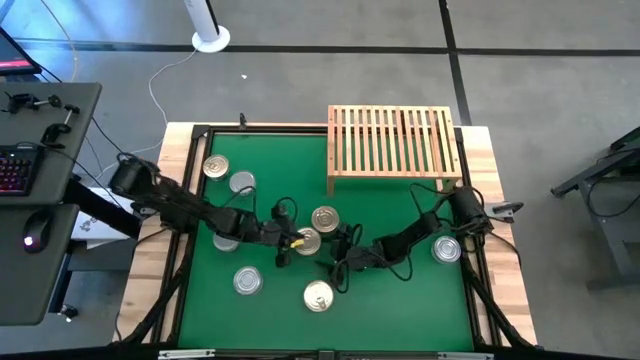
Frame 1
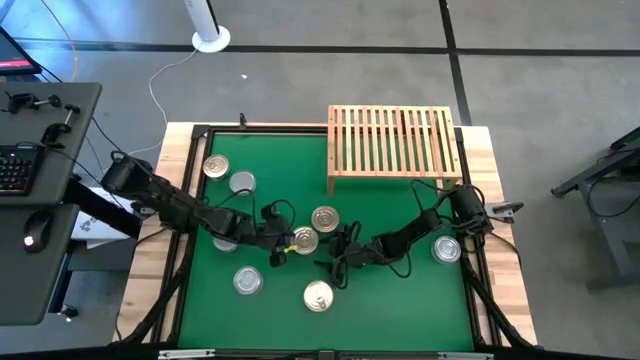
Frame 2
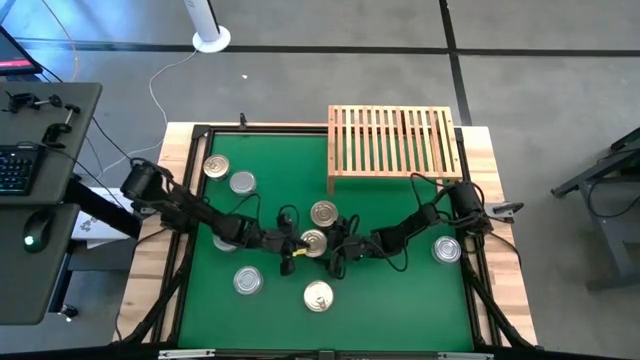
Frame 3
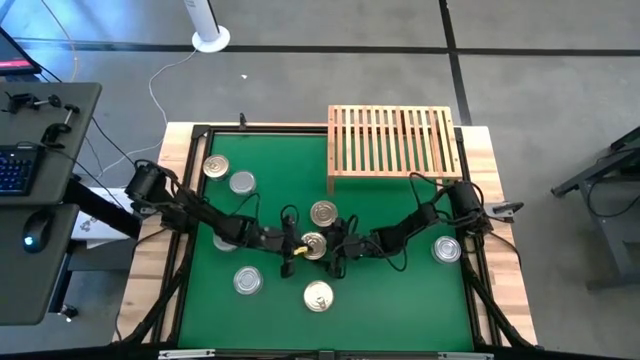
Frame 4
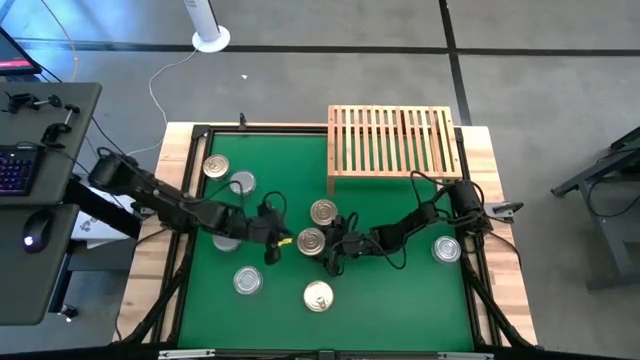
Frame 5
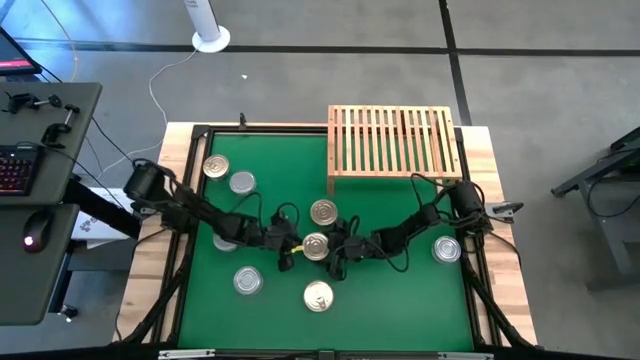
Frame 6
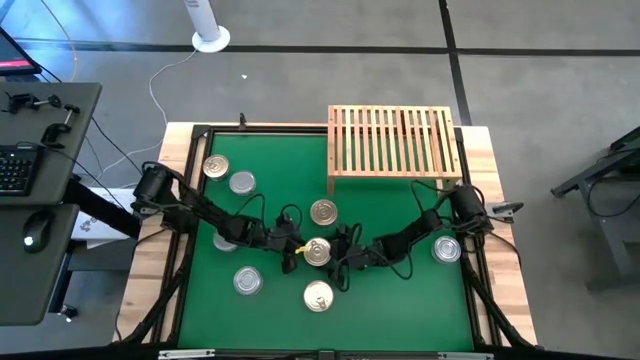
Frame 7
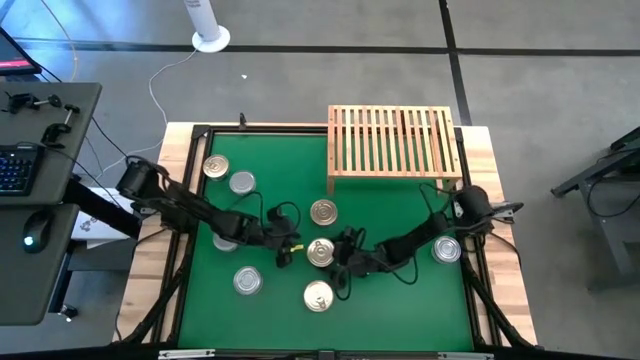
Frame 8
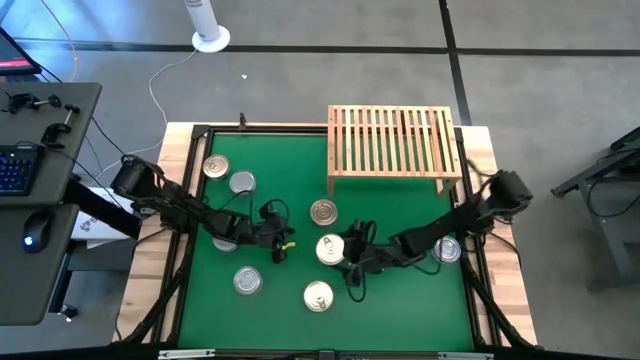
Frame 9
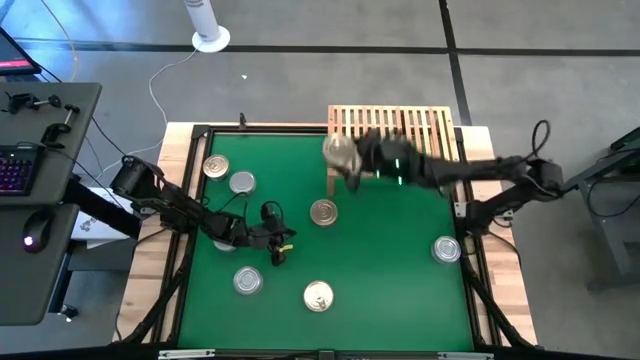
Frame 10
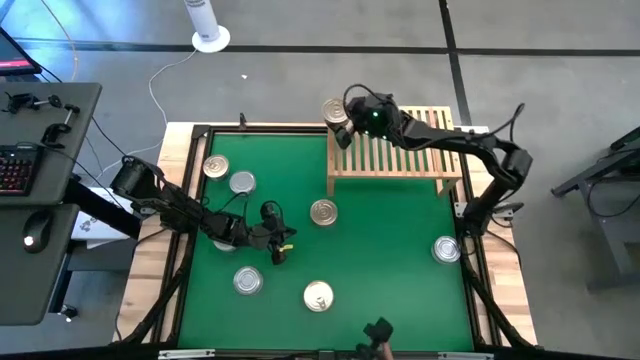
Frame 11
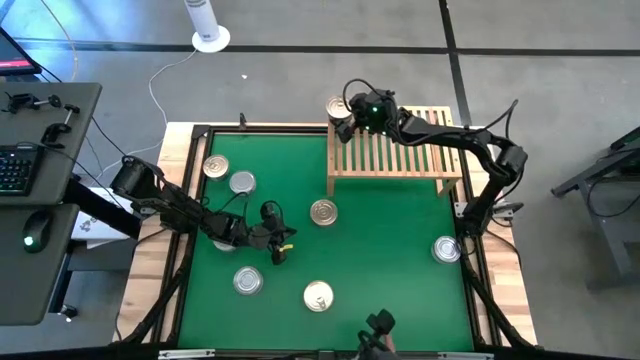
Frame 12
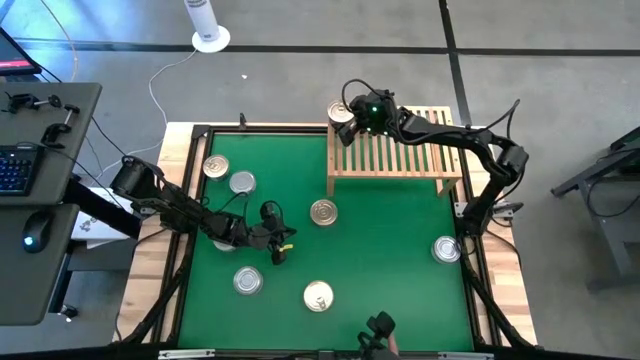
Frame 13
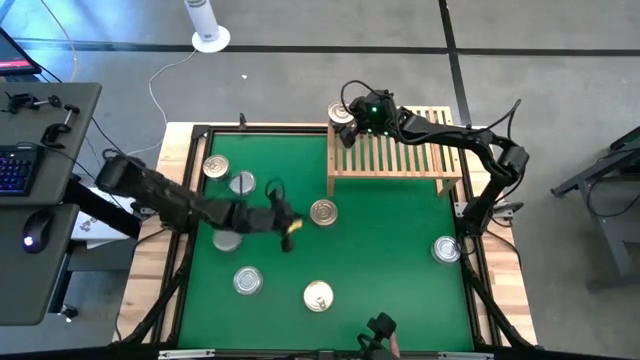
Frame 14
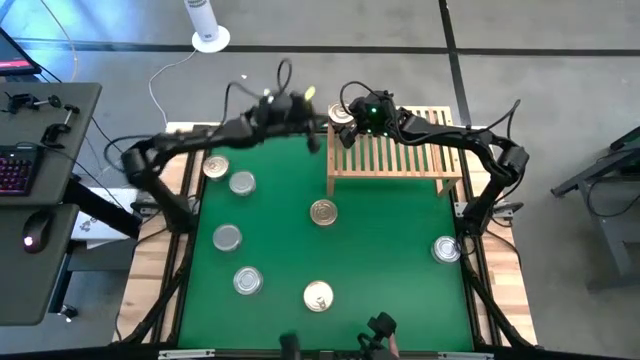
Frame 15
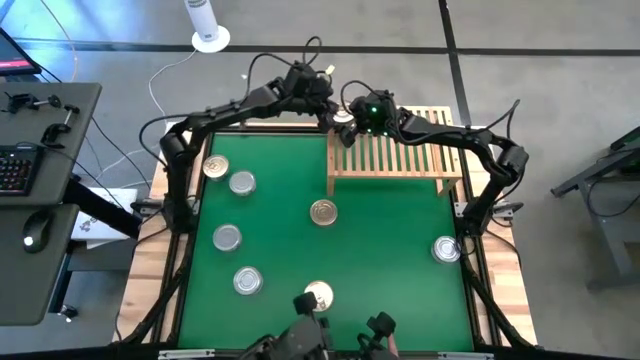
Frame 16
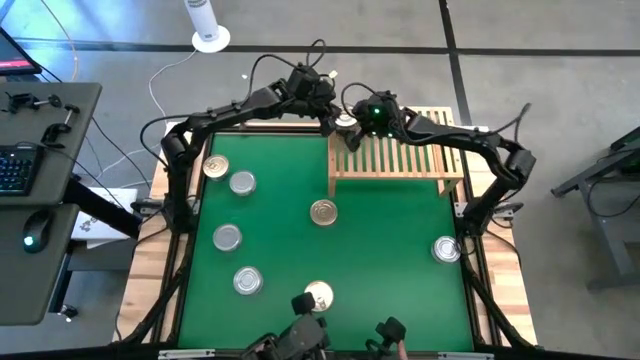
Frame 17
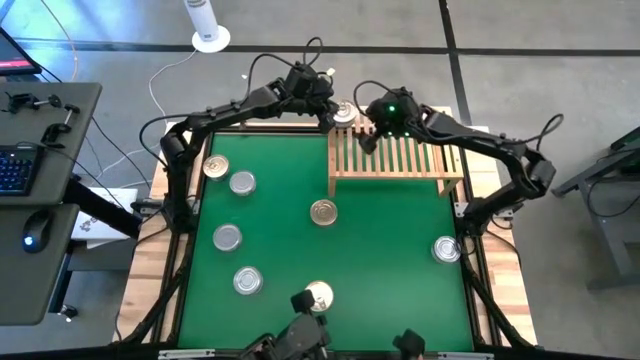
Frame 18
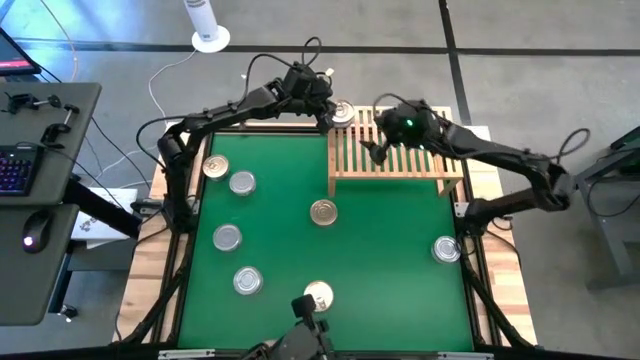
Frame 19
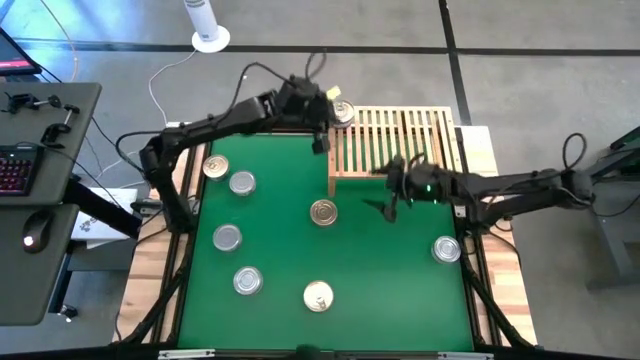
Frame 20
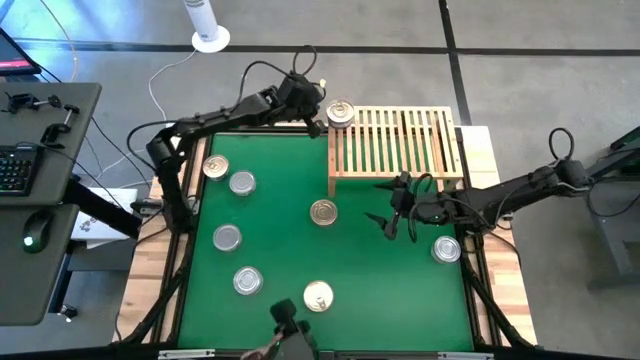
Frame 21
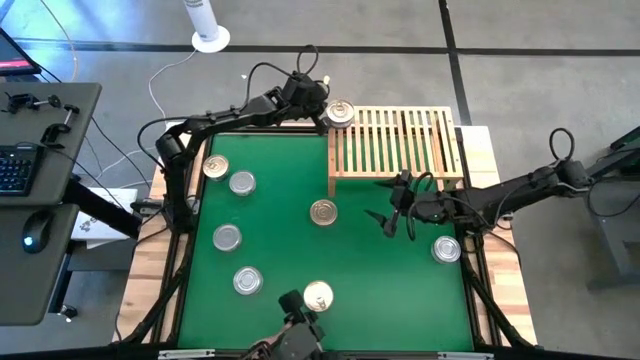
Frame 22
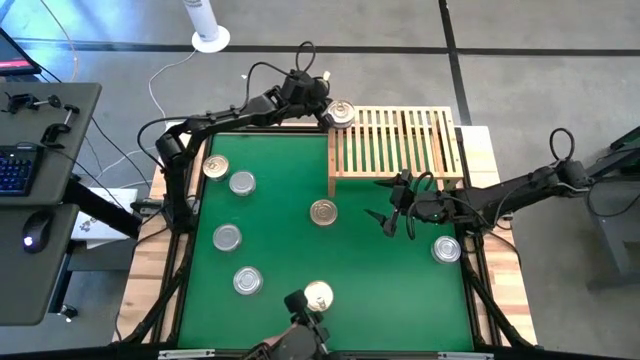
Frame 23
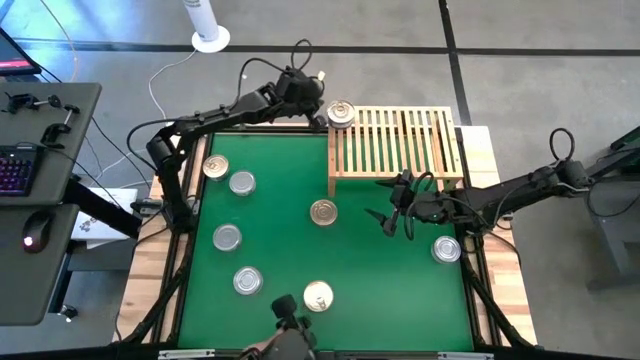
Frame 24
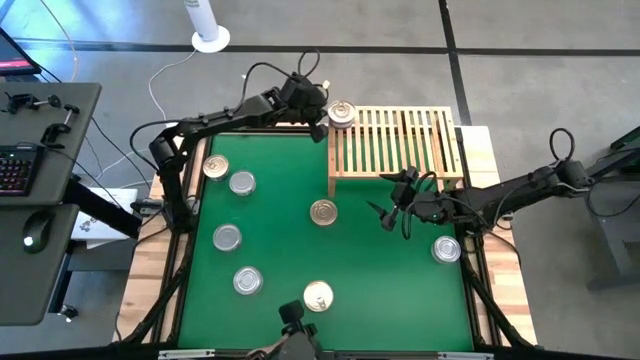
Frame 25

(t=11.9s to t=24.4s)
Task: Stack canned seafood by type on shelf
Put the blue pink tuna can on the shelf

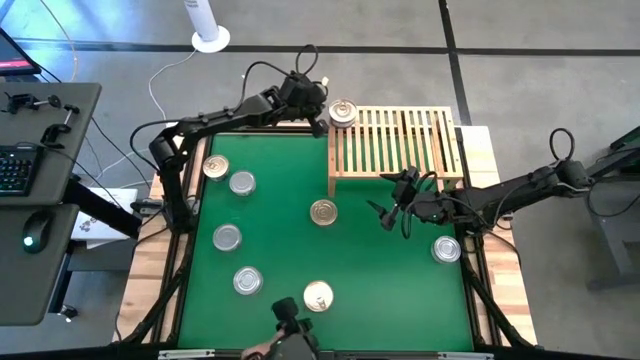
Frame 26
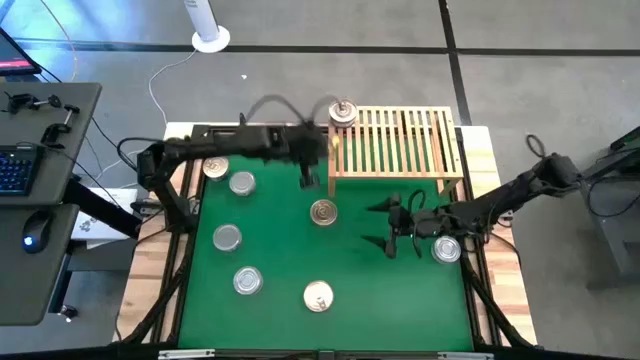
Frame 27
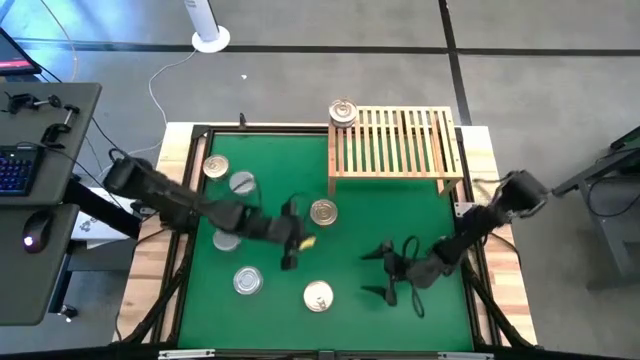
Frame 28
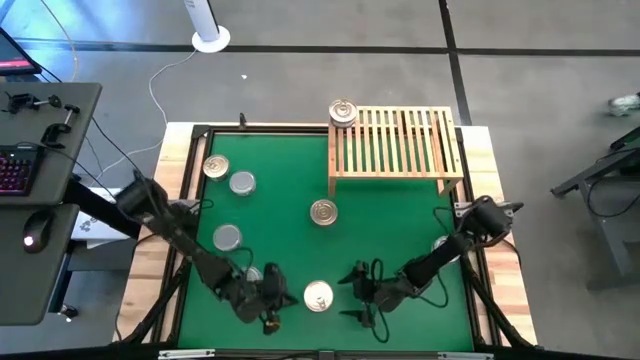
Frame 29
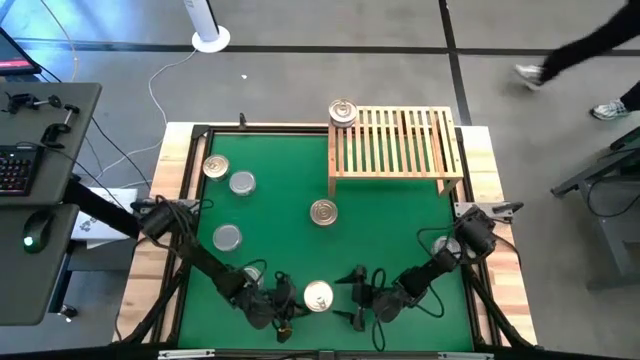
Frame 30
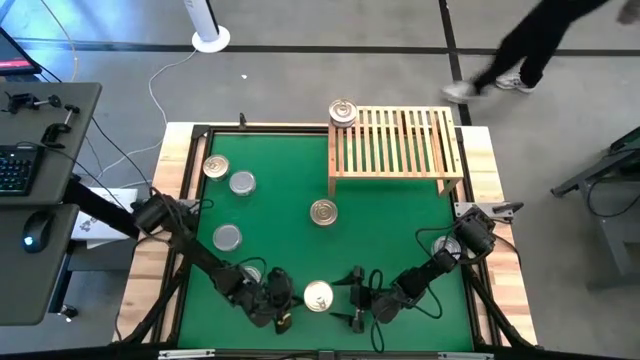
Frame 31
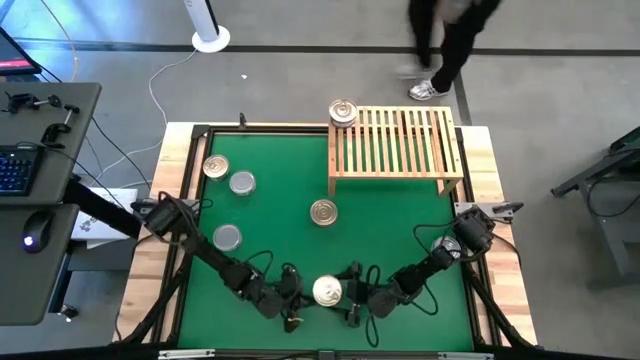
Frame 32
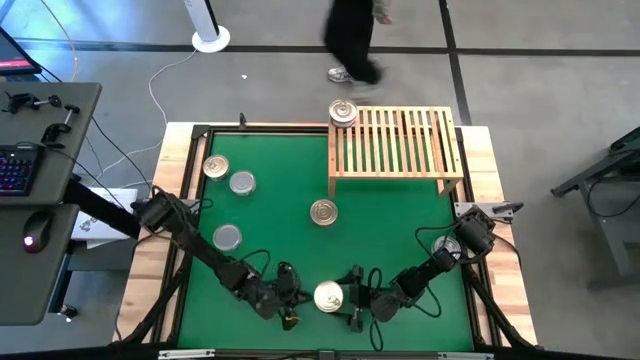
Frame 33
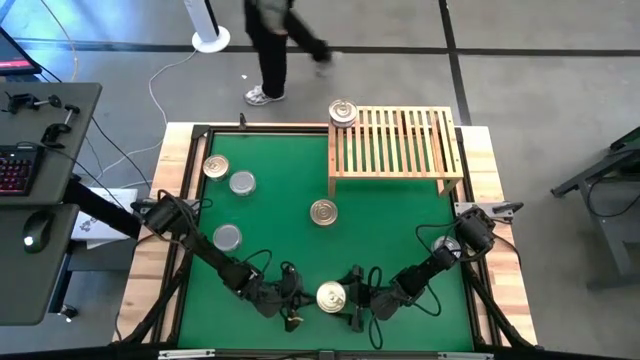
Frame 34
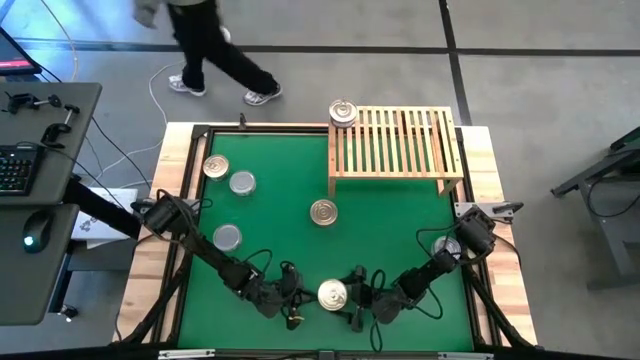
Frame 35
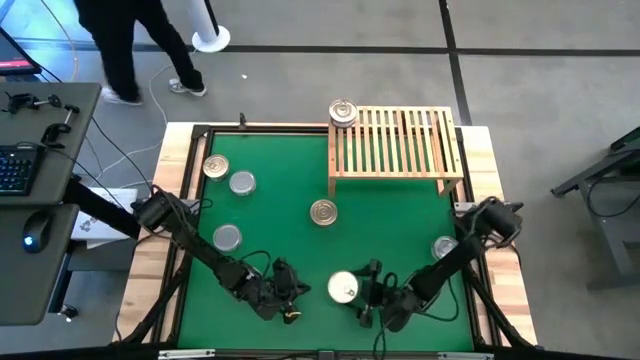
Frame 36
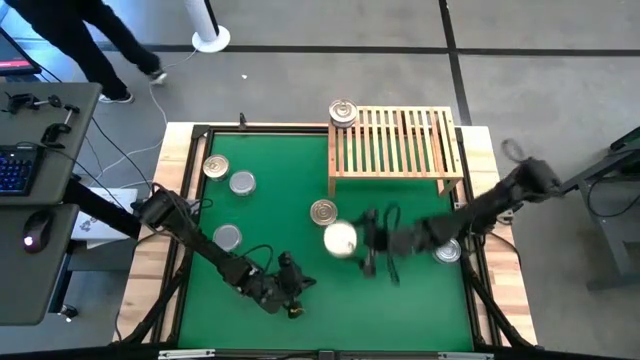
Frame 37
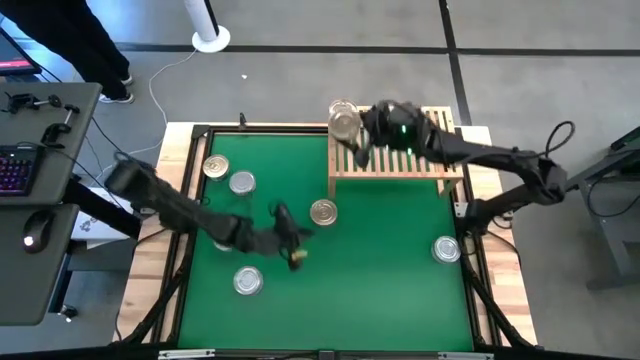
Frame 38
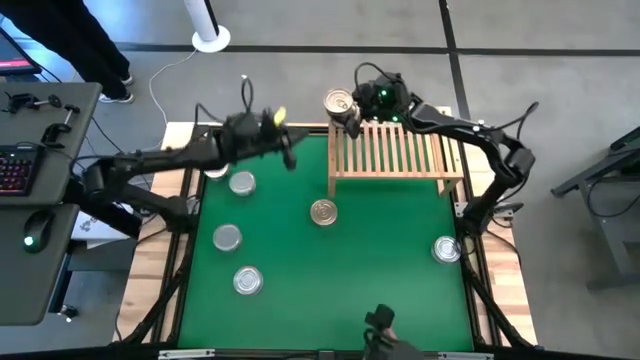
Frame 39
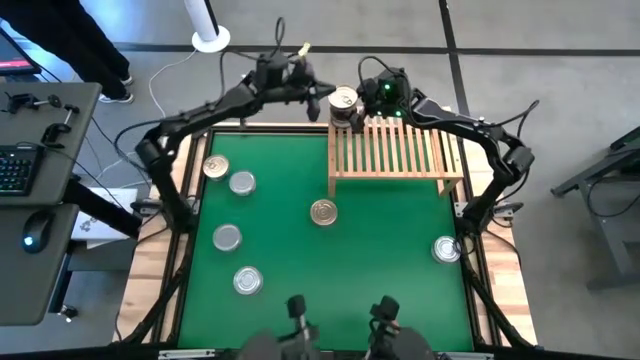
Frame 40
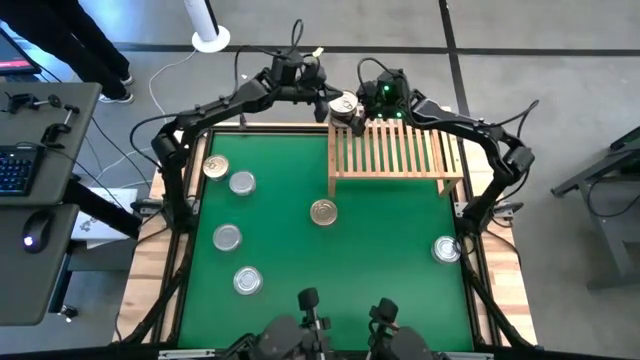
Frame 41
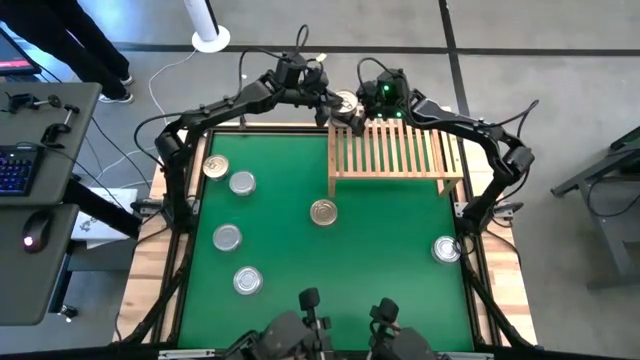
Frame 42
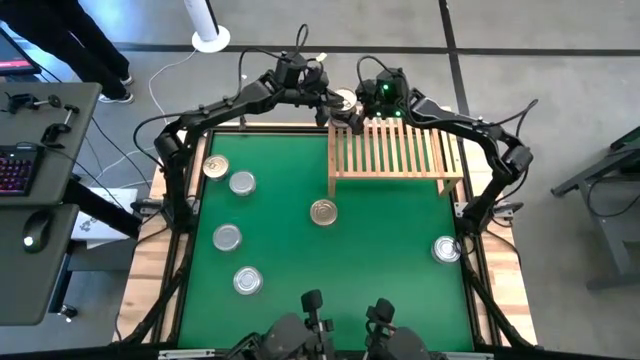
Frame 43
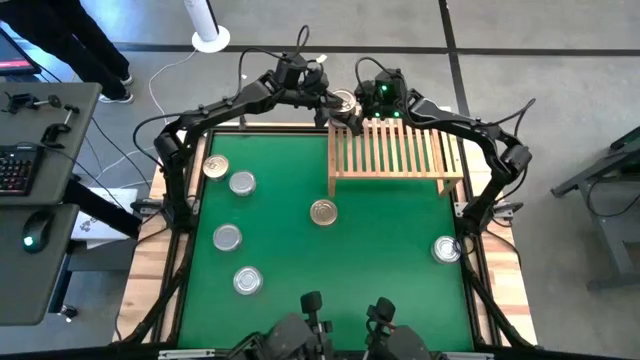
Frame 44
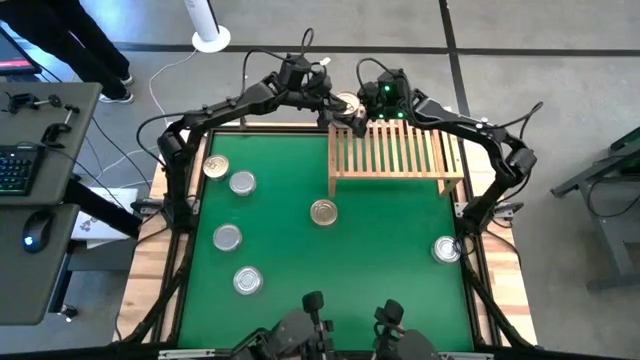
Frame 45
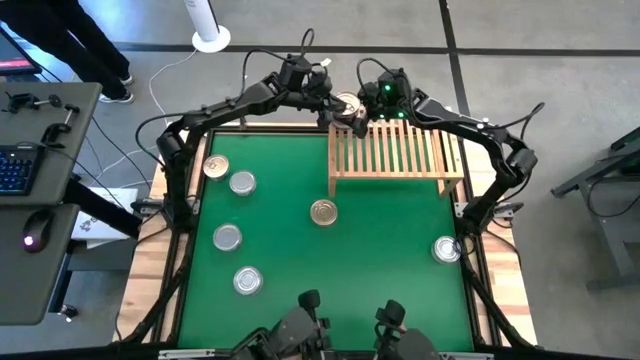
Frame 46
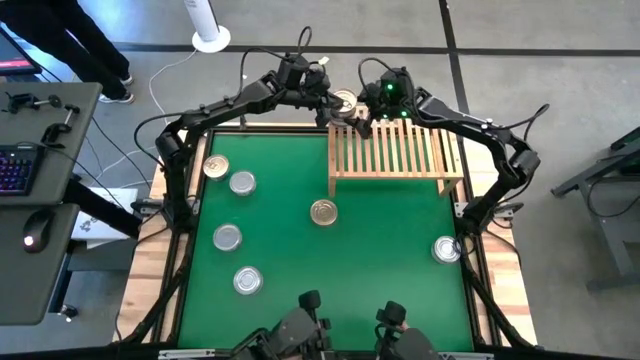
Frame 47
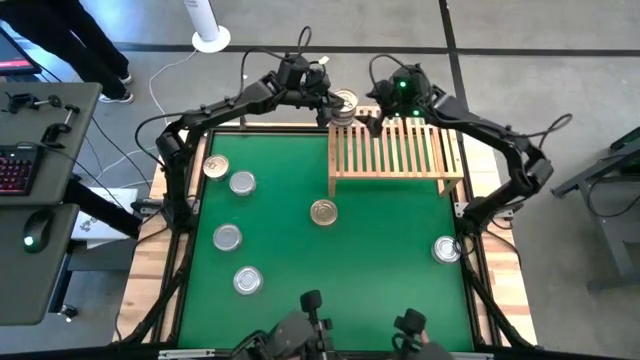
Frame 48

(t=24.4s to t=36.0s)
Stack the blue pink tuna can on top of the blue pink tuna can on the shelf
